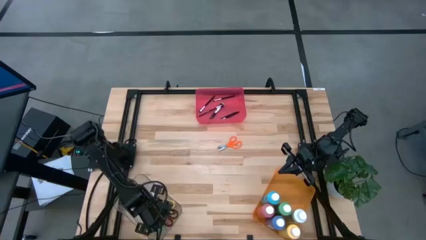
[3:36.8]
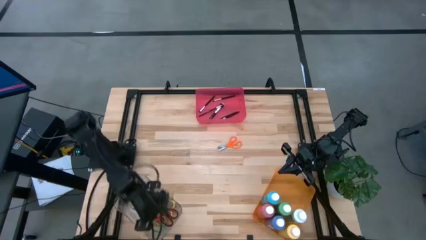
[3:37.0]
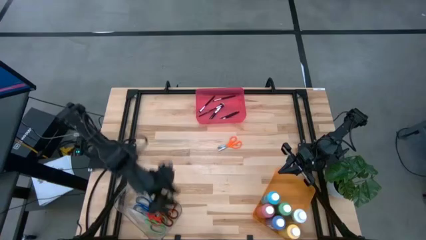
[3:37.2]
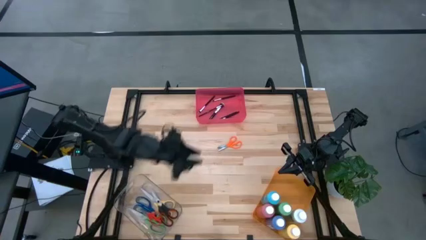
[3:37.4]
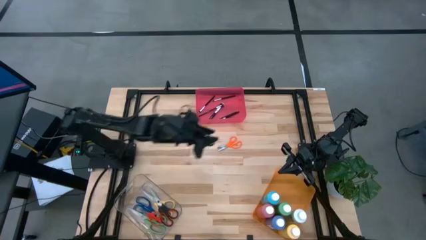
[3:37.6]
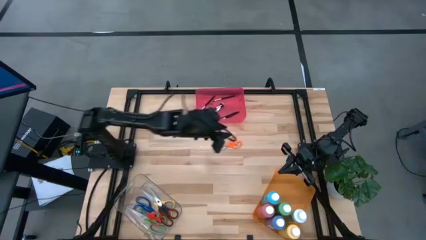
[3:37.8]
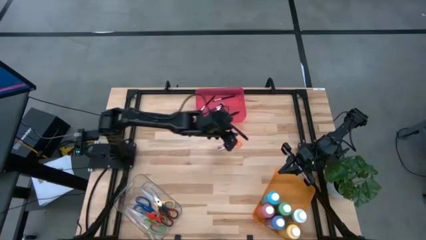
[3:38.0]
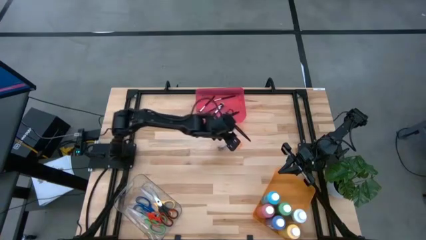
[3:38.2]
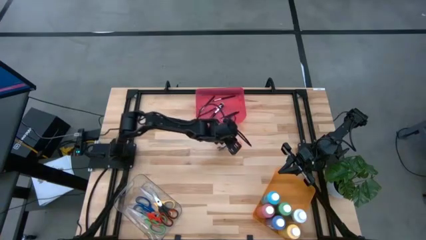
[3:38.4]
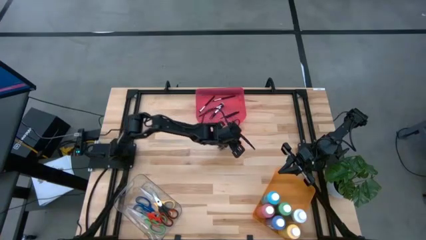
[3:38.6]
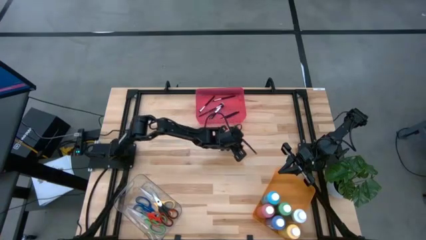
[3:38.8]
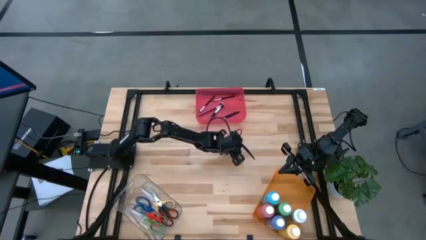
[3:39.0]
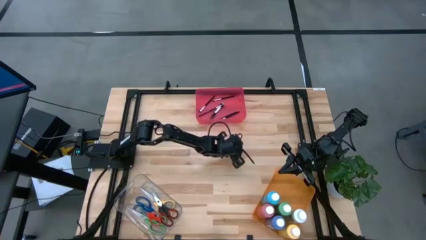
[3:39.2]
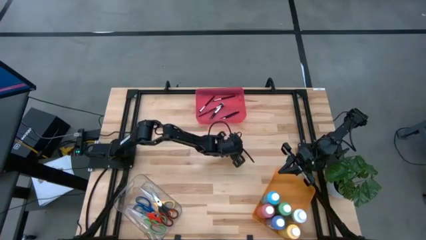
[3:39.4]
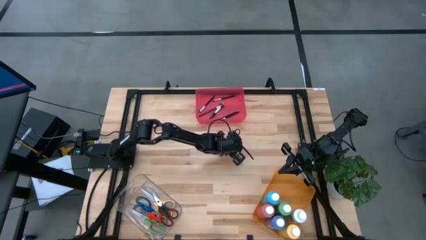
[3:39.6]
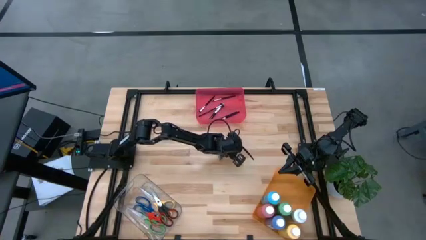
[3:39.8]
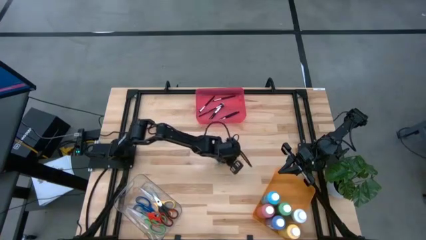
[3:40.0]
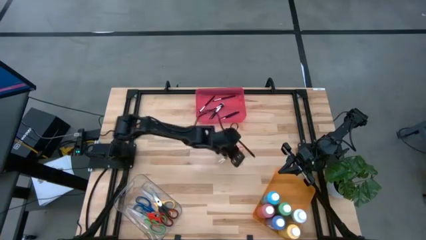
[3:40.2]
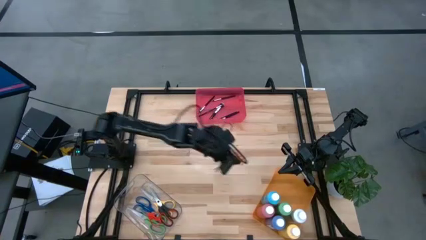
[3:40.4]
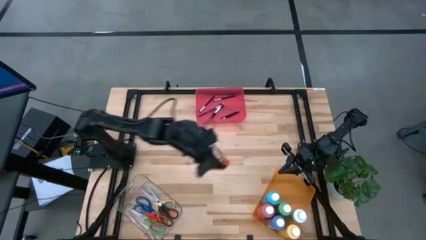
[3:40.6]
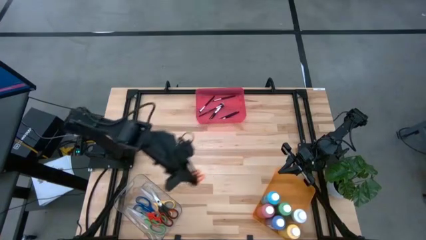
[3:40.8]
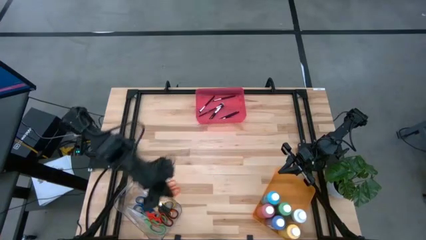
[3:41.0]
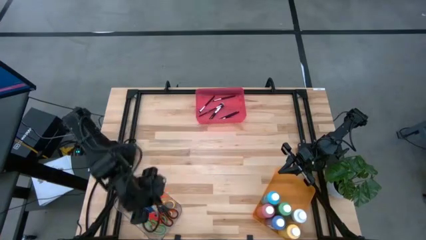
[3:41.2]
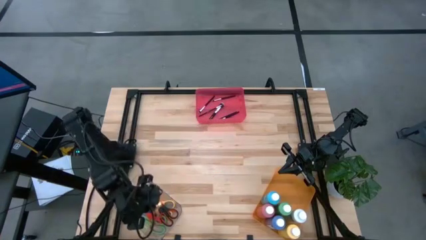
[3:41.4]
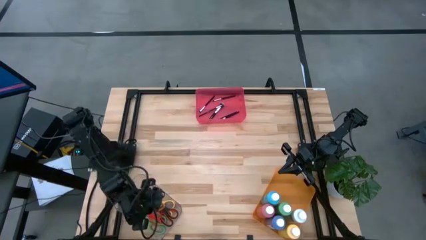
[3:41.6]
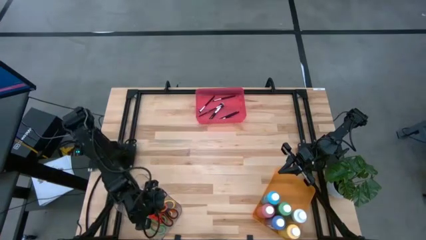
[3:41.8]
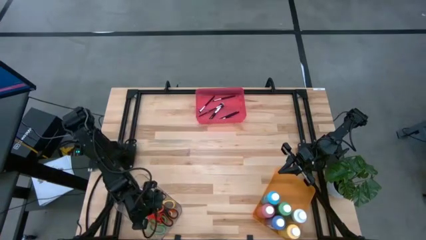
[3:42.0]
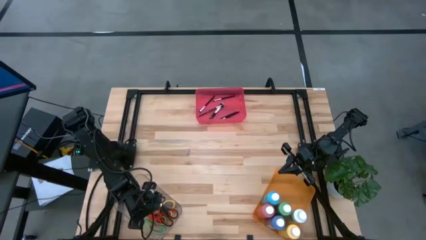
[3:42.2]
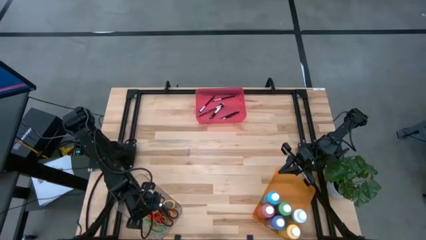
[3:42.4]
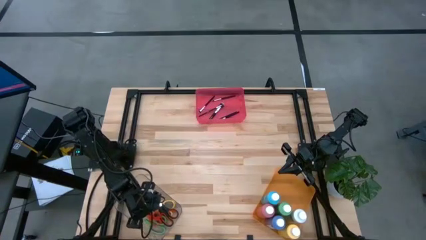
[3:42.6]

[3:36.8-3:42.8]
Task: Pick & Place Paint Supplies
Put the orange scissors into the transparent bin

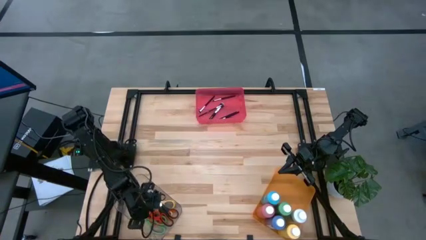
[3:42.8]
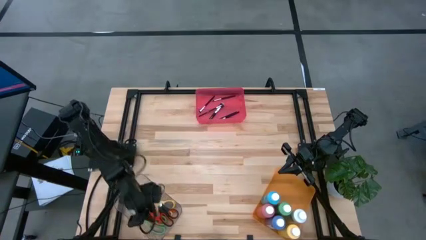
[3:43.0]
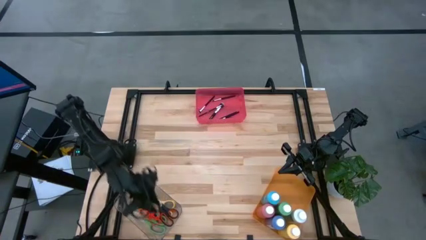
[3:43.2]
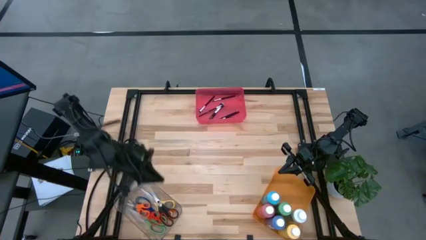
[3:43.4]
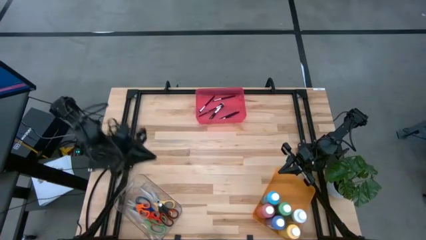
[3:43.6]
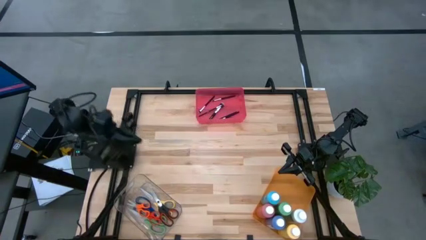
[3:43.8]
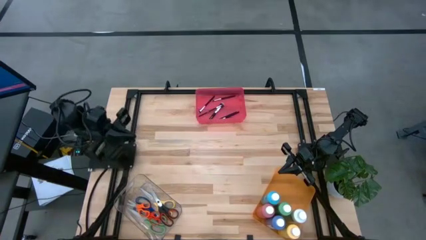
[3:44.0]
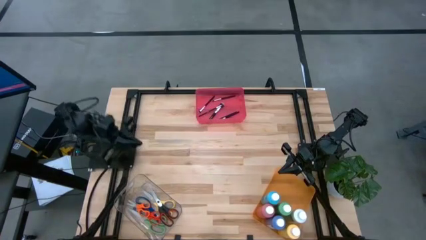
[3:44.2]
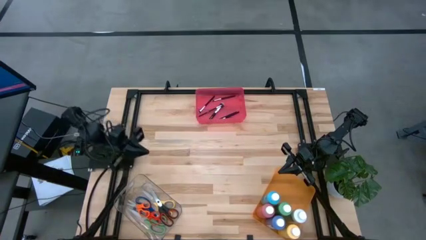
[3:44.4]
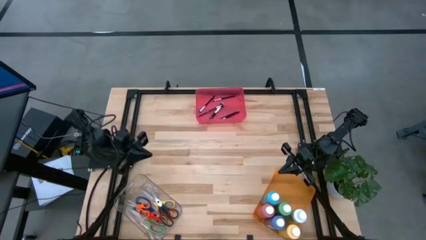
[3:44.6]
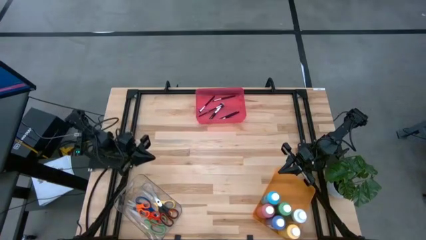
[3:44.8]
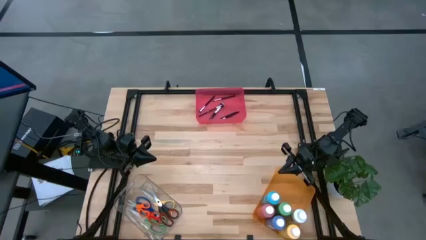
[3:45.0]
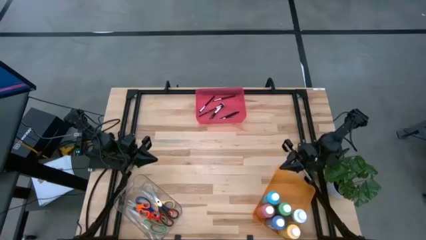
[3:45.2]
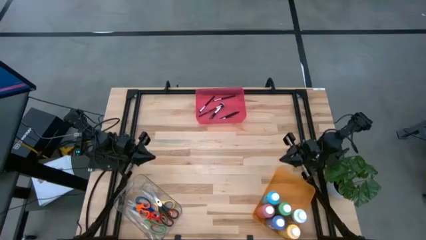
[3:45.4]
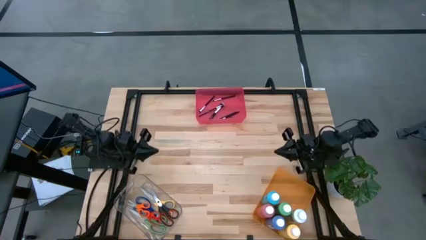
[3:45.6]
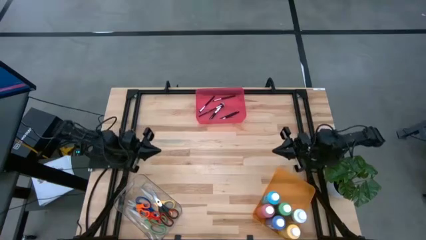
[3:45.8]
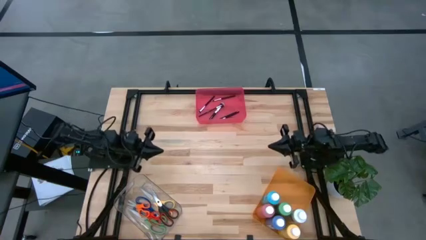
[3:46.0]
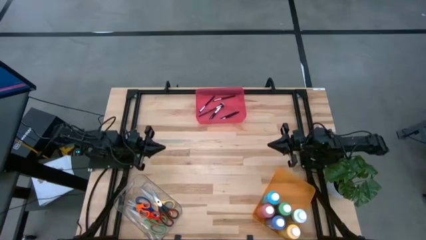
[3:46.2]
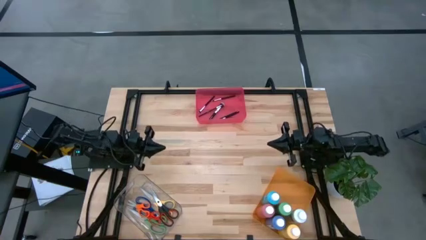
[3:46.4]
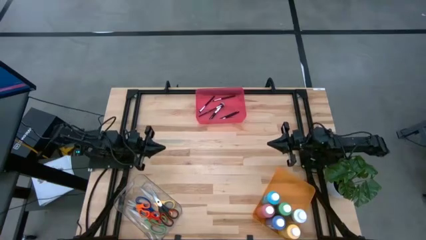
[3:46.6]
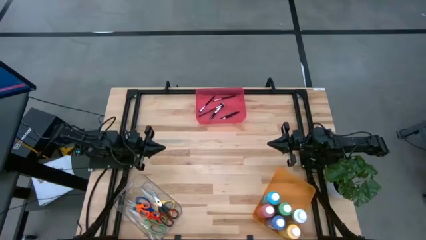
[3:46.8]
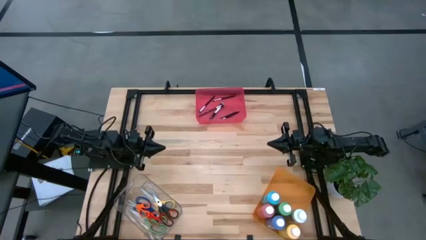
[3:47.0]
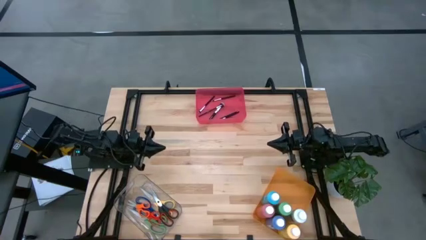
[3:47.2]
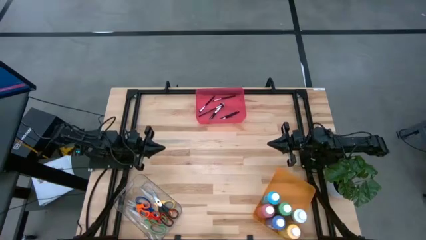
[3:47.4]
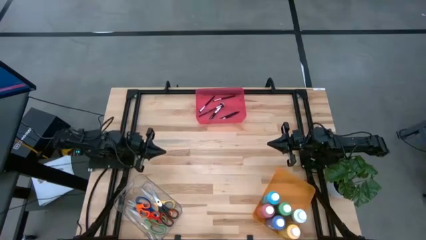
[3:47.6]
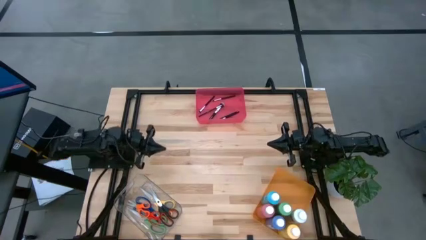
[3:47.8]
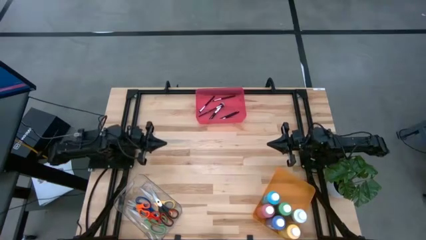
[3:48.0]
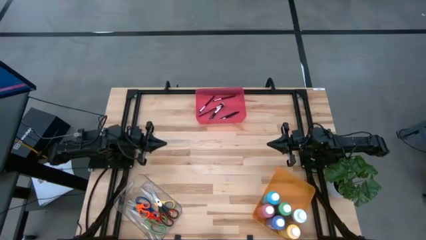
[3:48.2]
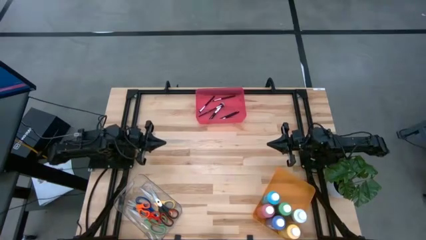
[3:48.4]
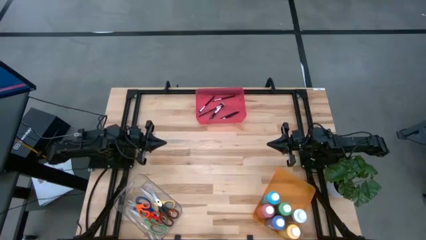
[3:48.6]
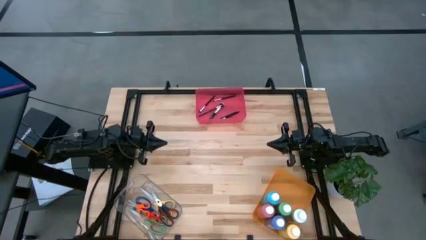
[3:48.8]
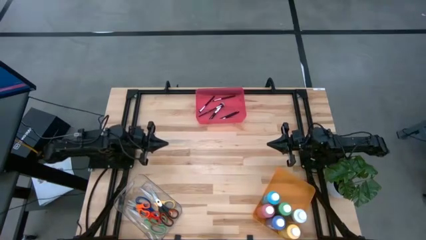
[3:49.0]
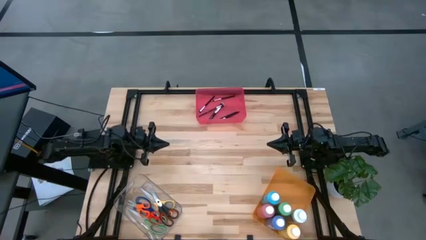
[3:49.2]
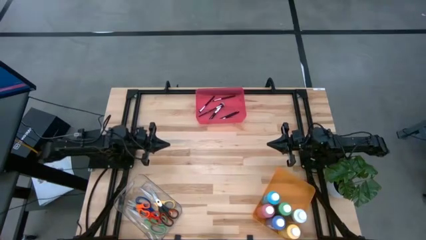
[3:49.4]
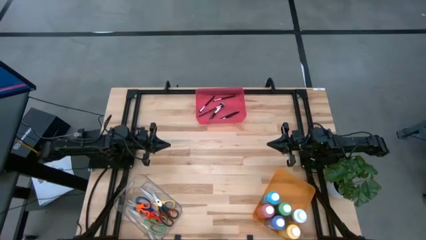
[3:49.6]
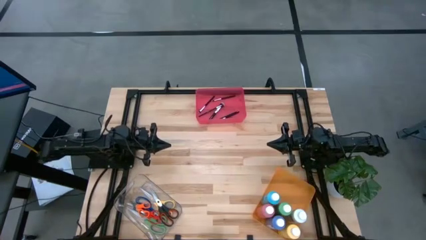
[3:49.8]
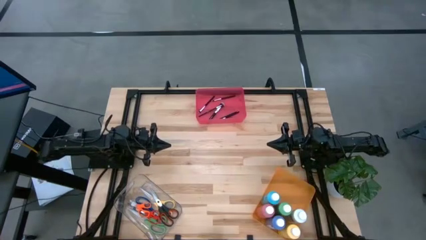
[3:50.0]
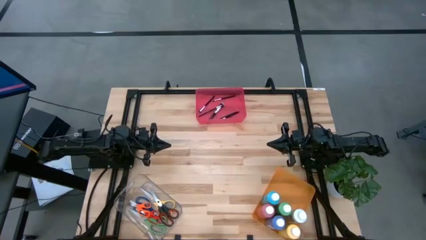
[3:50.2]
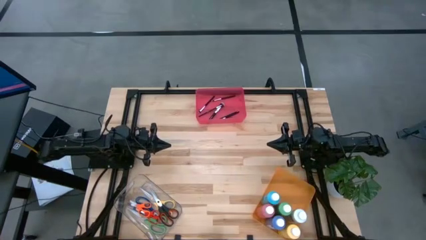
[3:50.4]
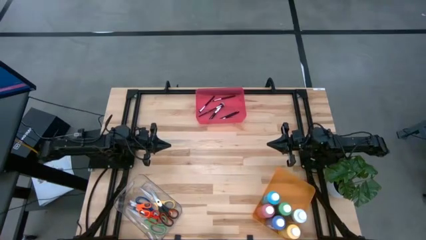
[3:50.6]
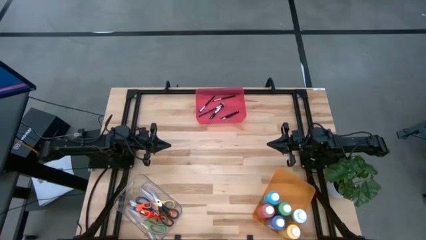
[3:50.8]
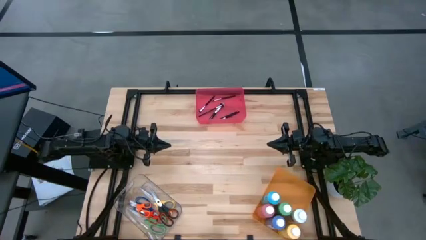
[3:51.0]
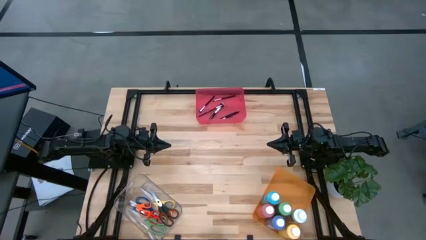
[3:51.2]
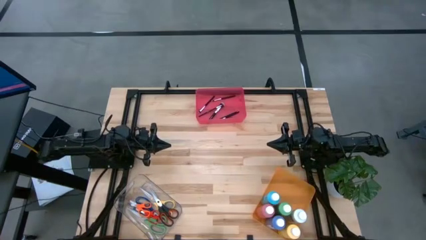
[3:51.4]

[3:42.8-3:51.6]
Return to Home Position

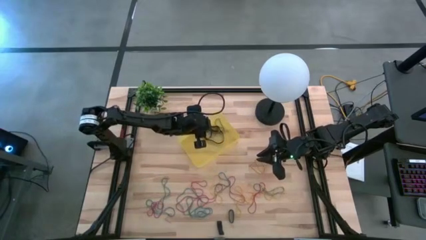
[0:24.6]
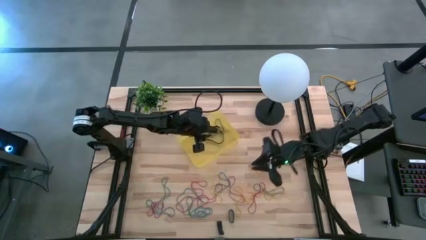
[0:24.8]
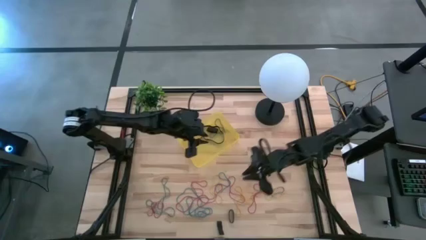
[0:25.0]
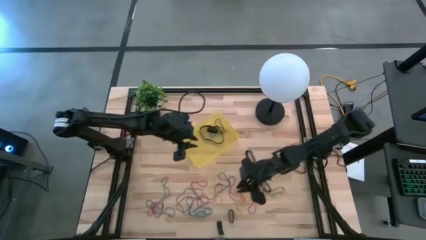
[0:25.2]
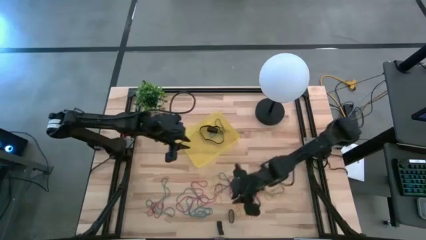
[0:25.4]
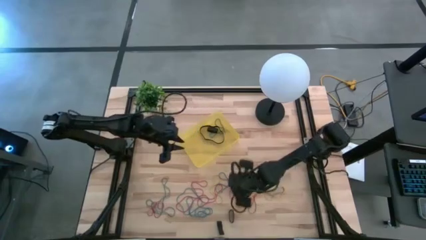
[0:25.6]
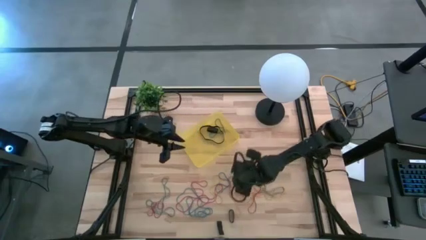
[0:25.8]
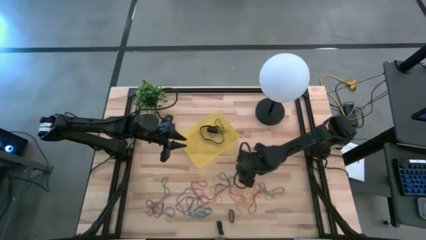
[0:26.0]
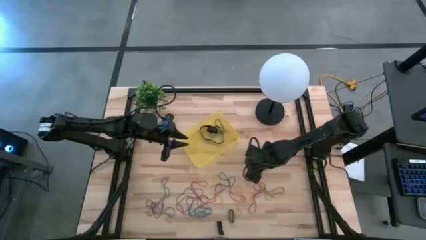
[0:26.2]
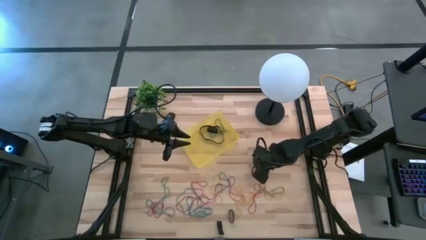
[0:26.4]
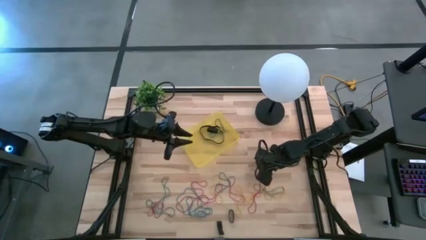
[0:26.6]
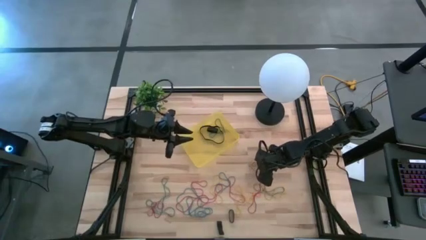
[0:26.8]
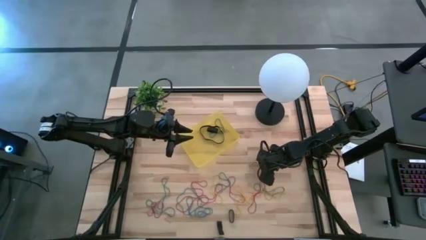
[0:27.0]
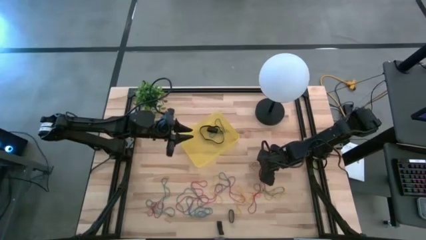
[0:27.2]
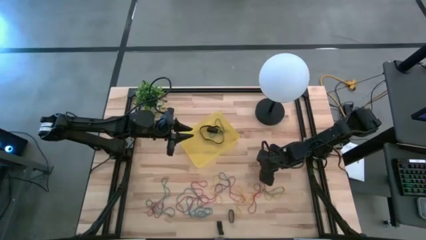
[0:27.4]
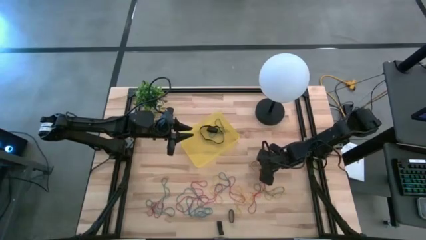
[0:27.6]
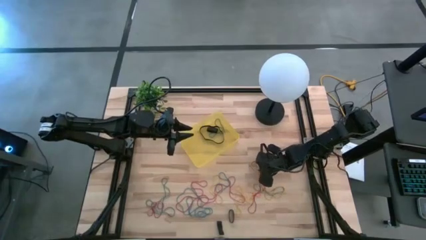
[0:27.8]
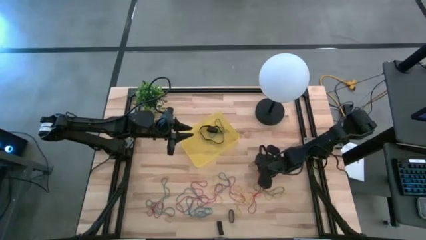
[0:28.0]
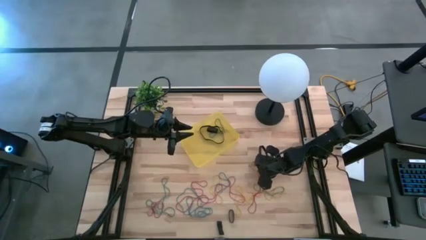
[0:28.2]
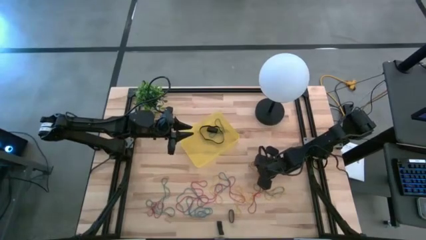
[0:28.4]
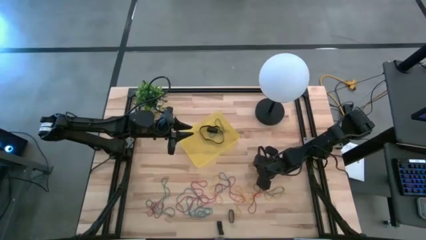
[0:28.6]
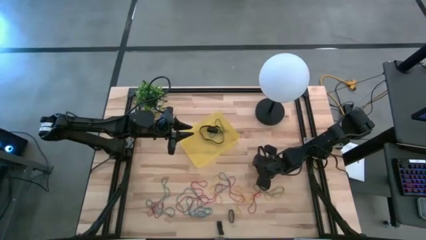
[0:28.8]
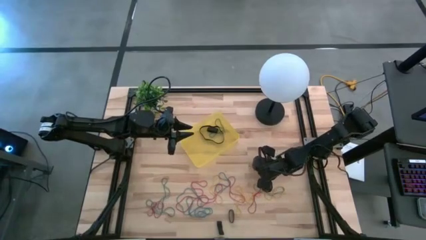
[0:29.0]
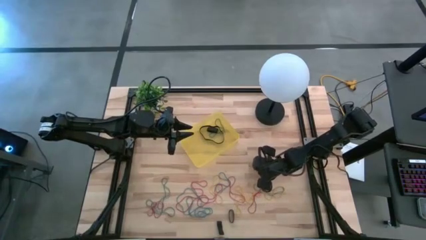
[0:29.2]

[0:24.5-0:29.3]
Task: Pick and place rubber bands into bin
Put the yellow rubber band into the yellow bin
